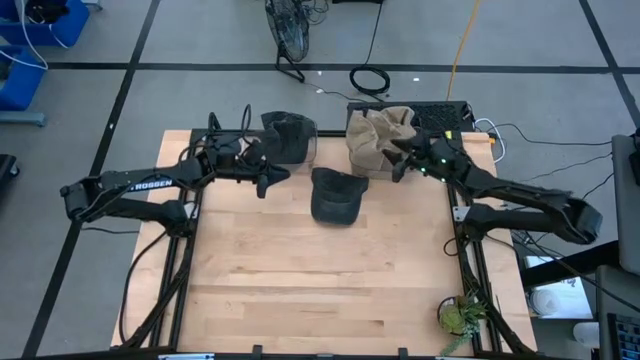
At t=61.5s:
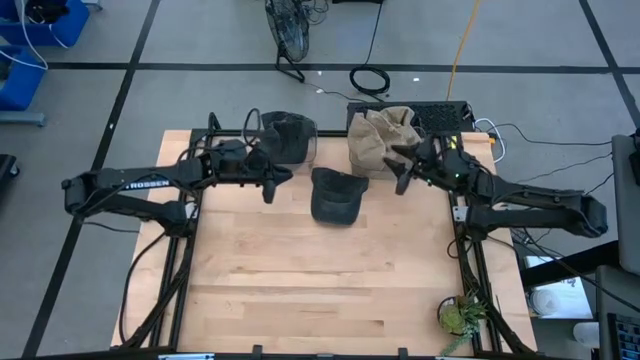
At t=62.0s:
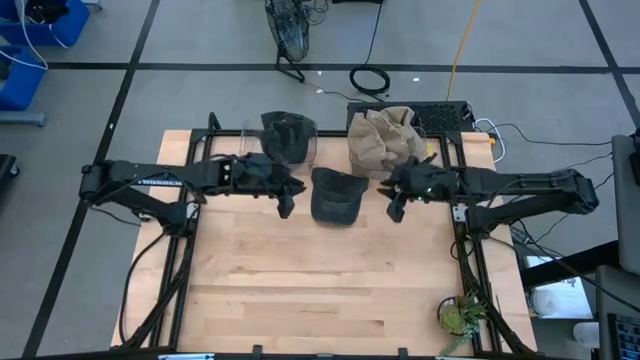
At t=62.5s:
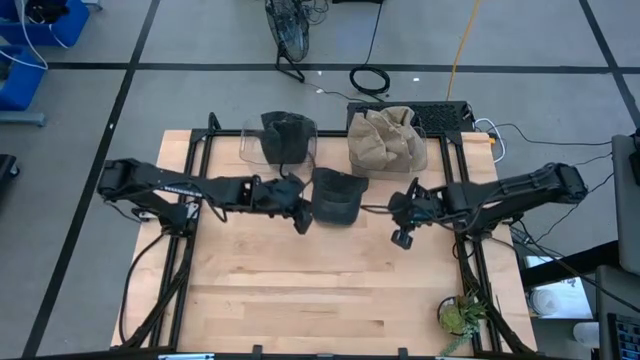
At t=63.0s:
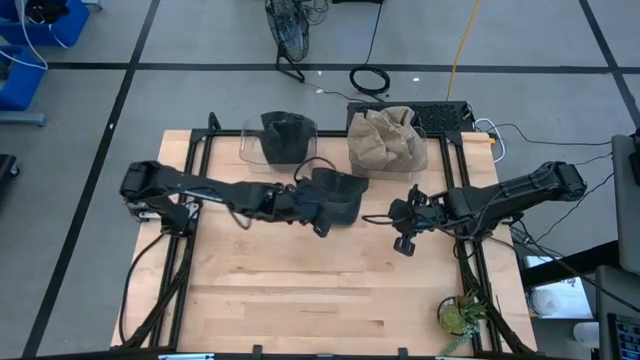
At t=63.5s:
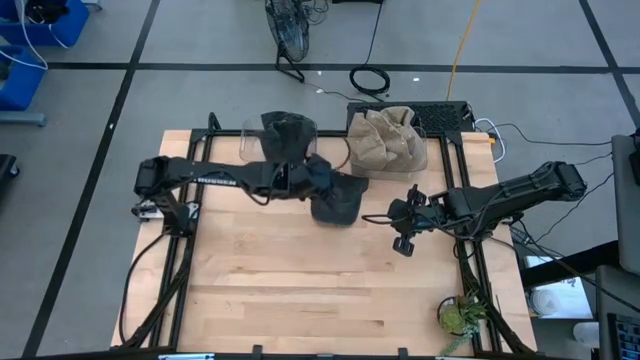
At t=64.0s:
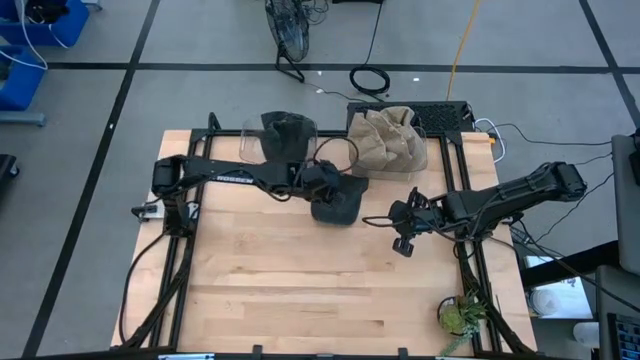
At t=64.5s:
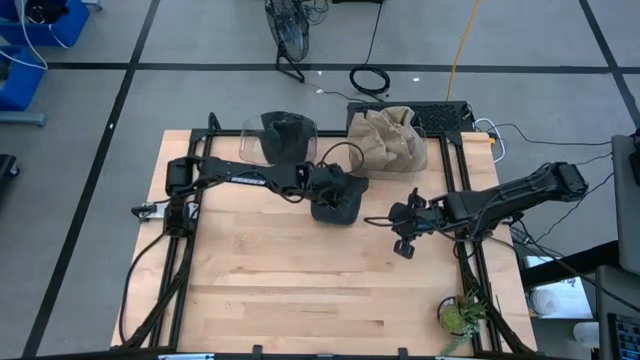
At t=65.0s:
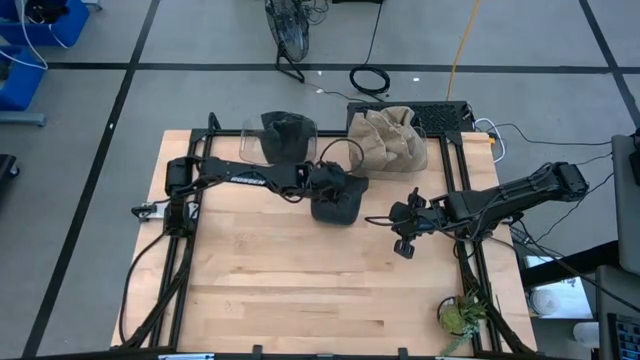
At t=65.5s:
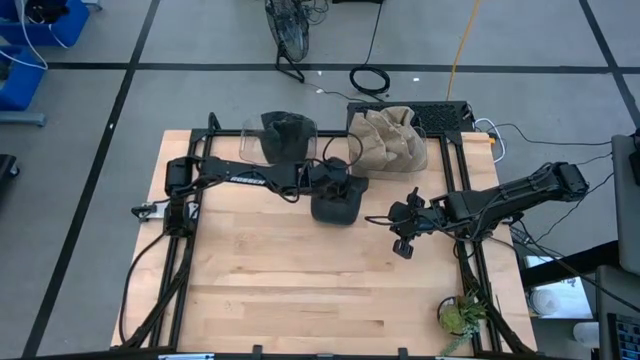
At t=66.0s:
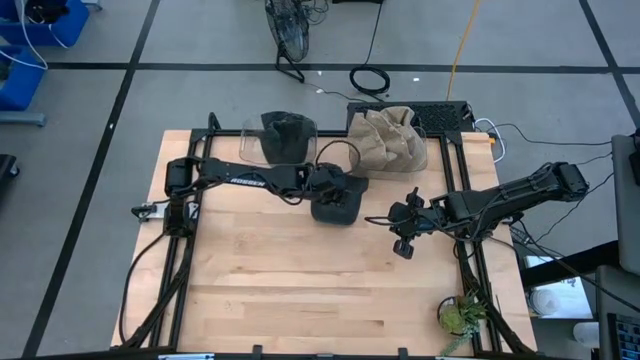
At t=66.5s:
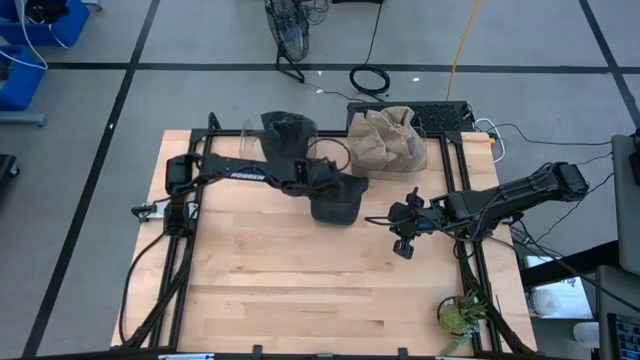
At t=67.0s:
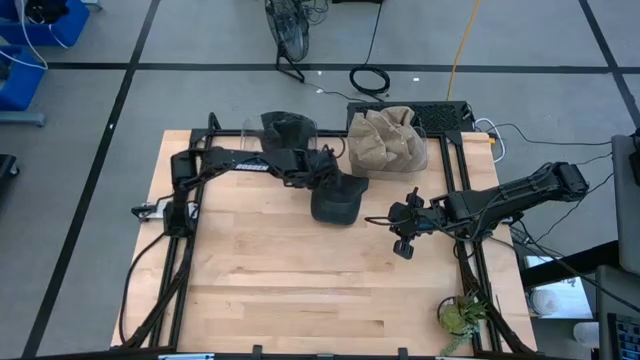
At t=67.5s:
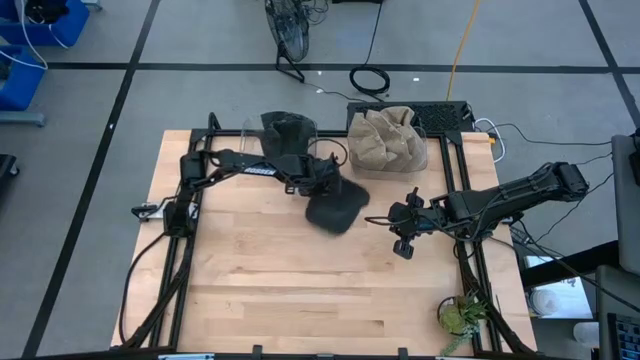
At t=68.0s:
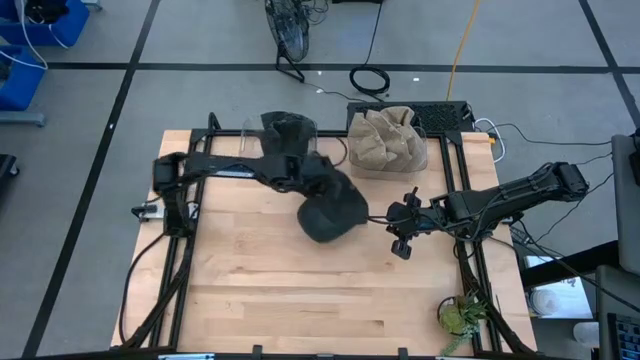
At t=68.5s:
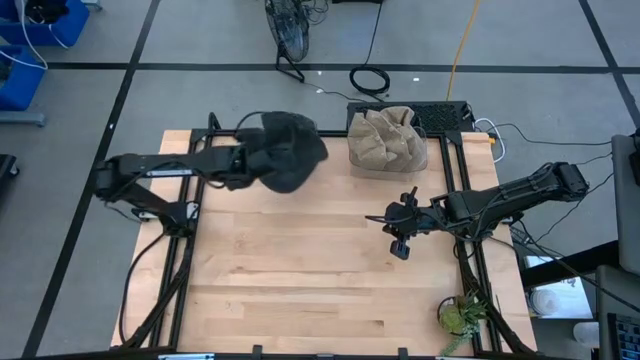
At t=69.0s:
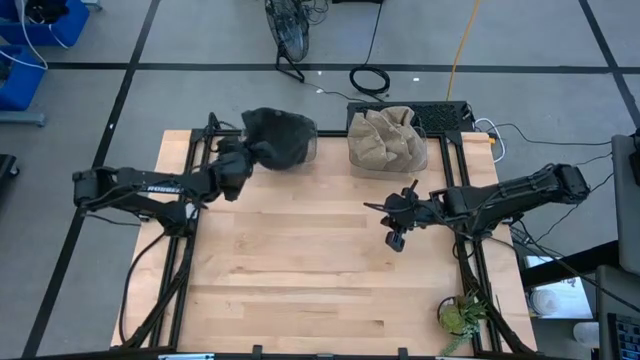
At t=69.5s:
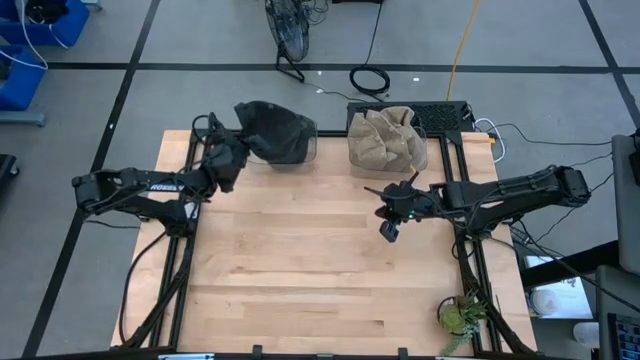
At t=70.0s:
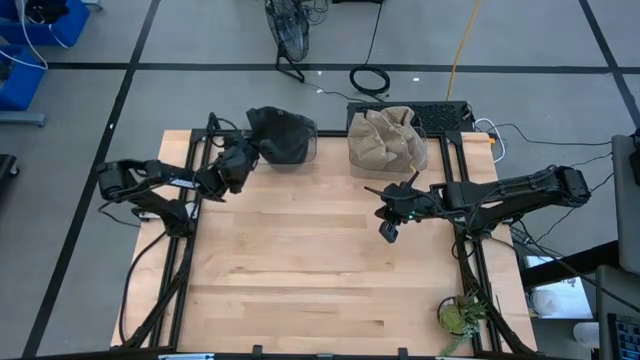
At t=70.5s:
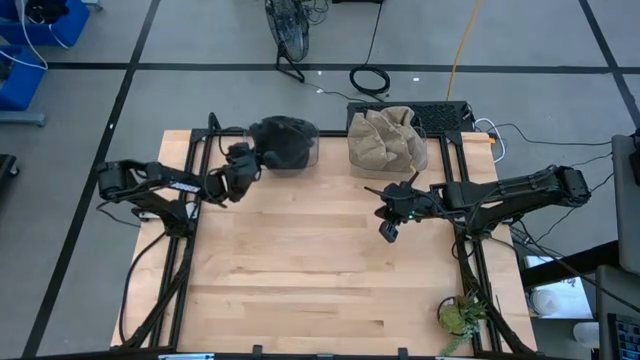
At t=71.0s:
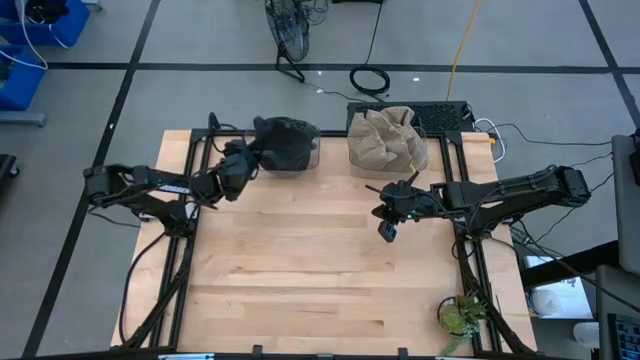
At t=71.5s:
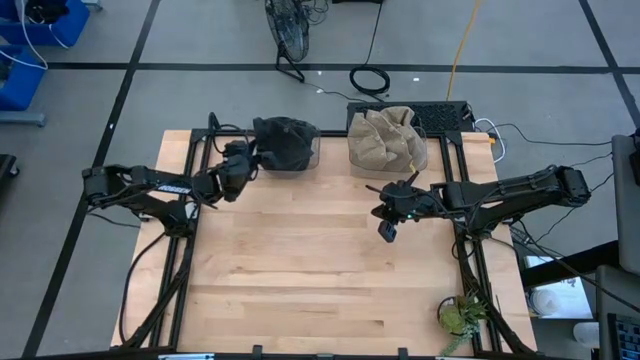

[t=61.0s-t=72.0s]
Task: Pick & Place hat
Put the black cap into the left transparent bin

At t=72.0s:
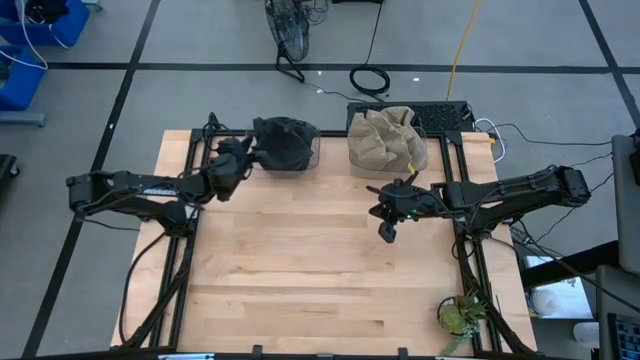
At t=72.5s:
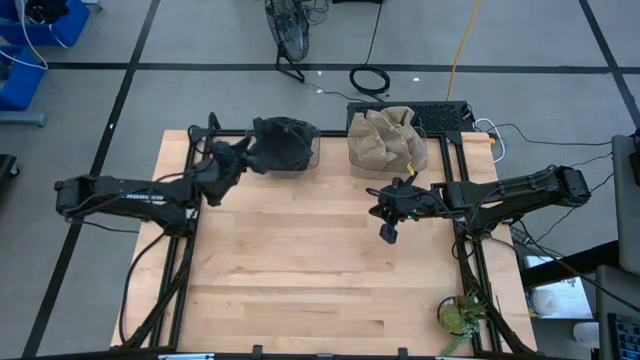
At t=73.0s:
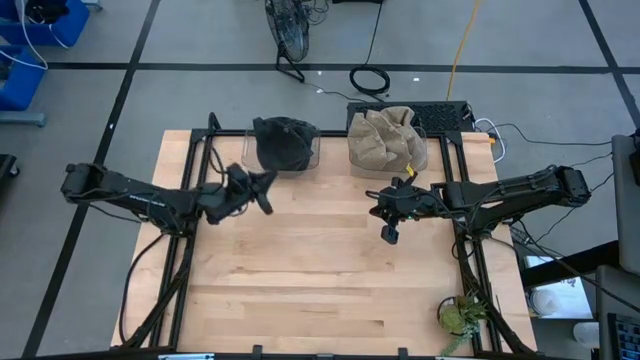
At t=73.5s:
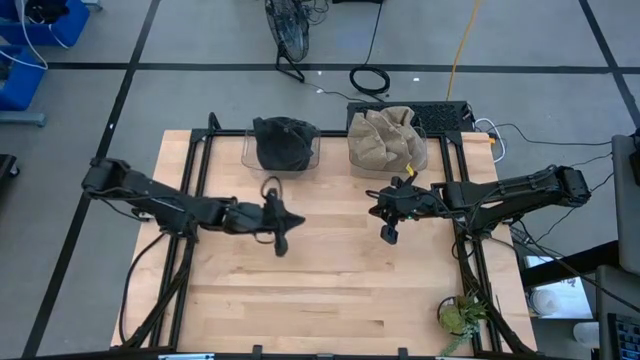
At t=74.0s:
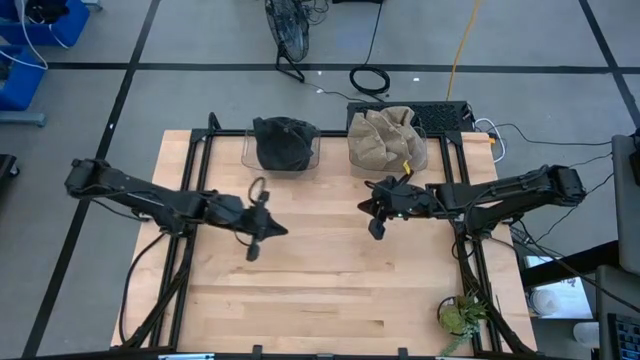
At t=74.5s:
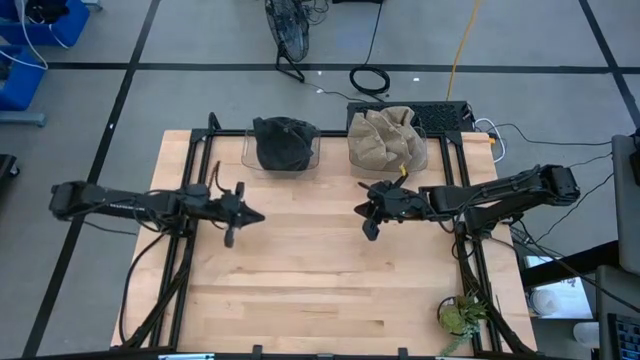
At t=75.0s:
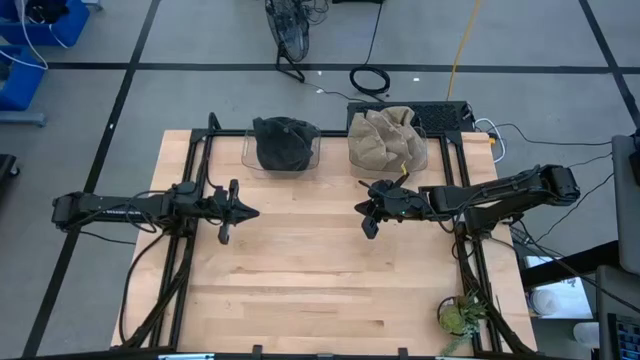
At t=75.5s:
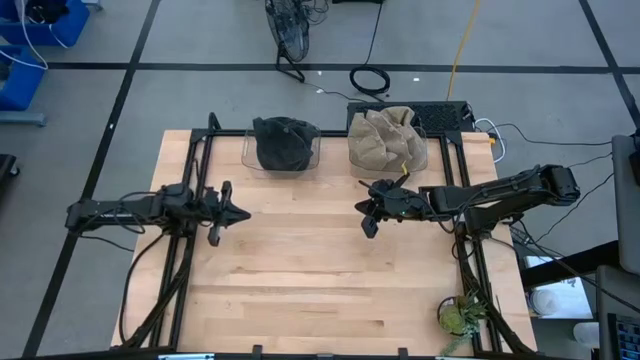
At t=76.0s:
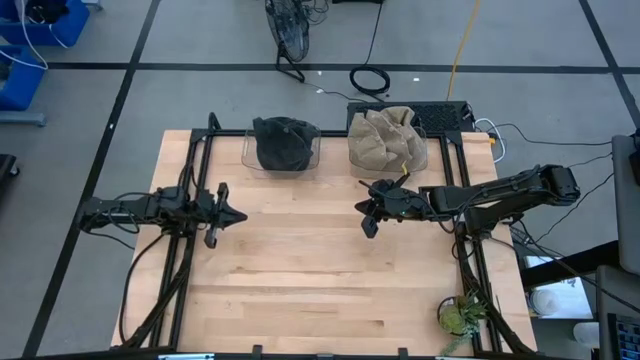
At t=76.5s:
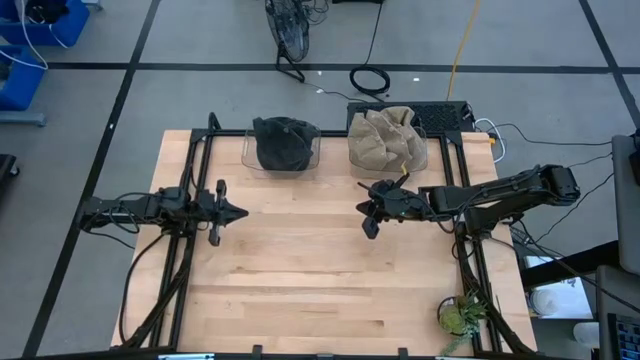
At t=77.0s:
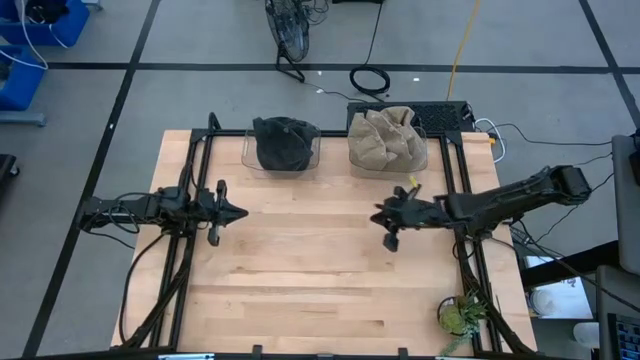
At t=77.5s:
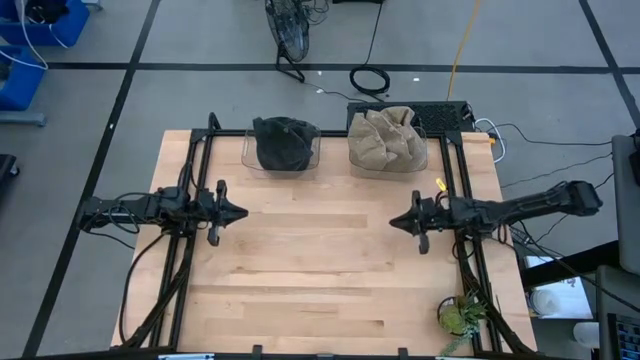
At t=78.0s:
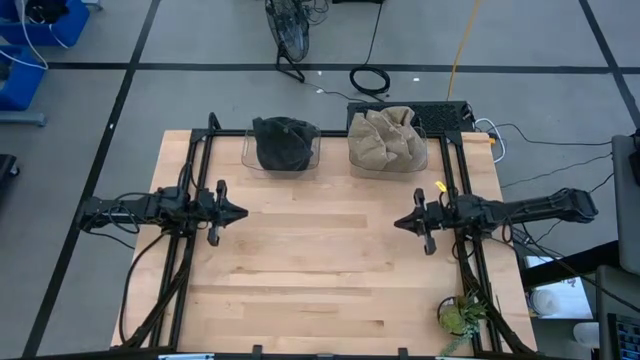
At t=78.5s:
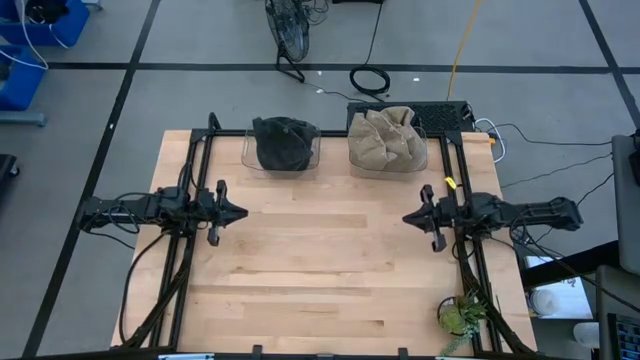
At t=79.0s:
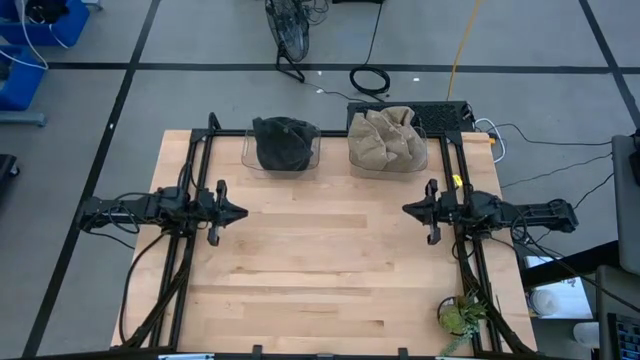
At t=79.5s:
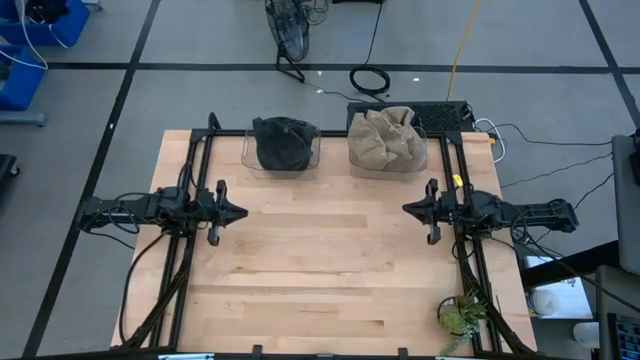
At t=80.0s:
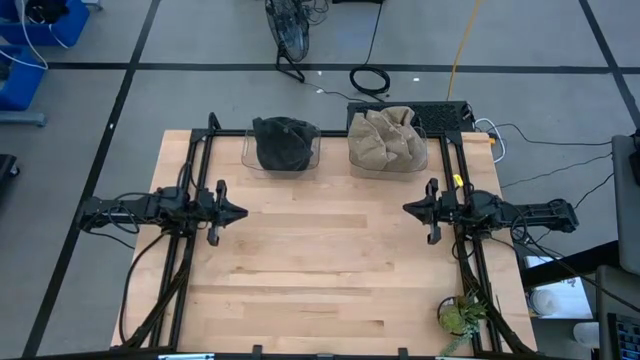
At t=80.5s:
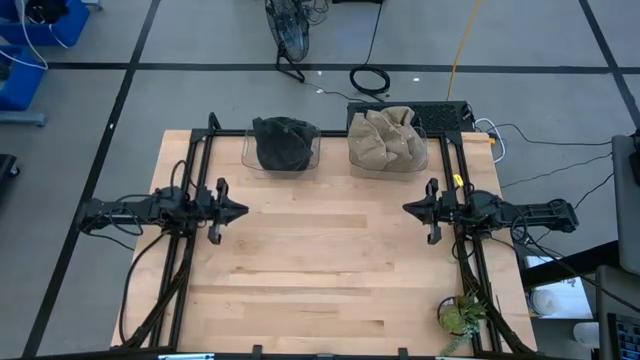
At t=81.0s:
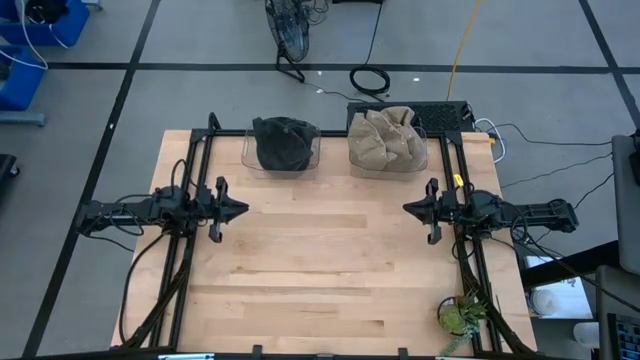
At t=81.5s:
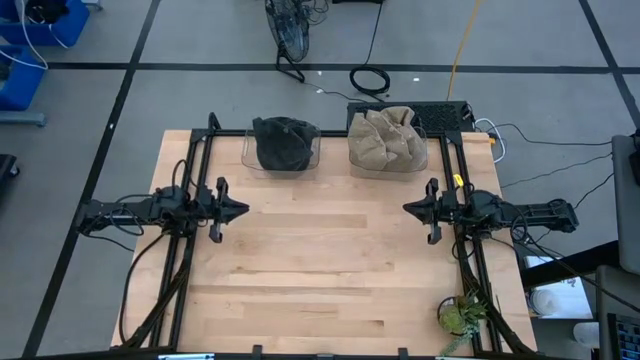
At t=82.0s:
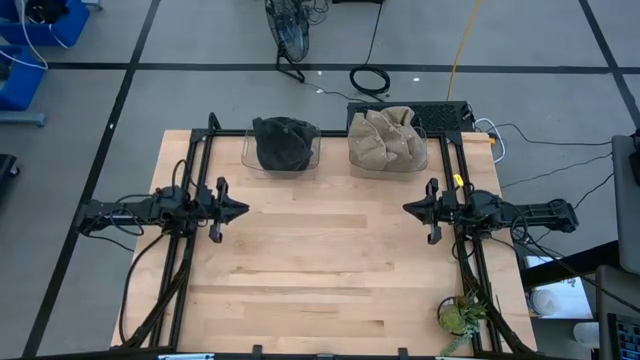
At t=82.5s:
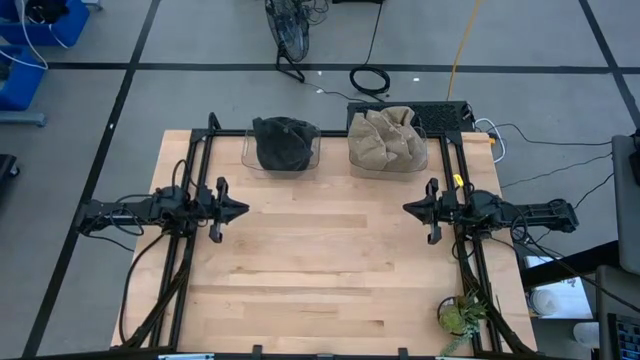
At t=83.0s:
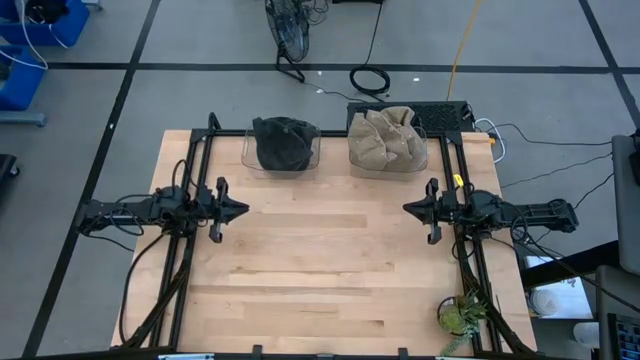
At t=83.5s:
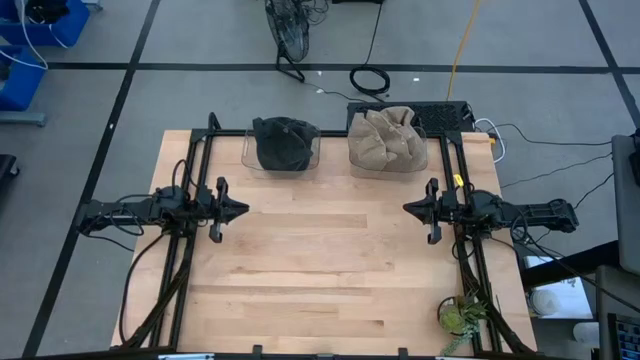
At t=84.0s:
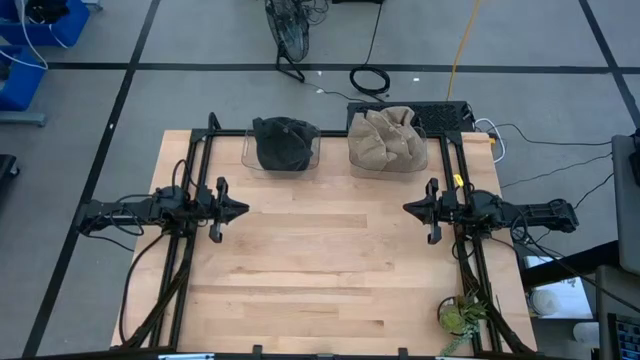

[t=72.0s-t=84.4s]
Return to Home Position
